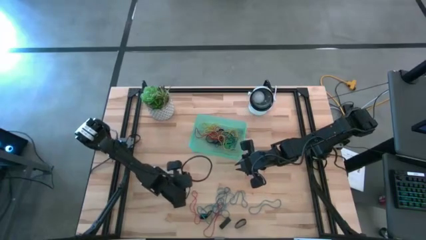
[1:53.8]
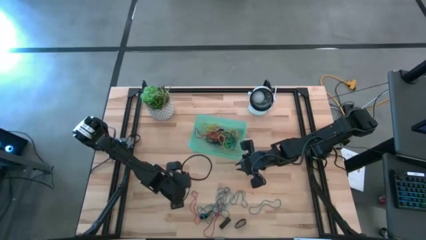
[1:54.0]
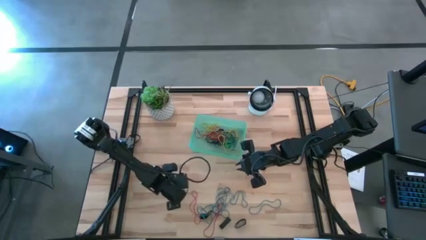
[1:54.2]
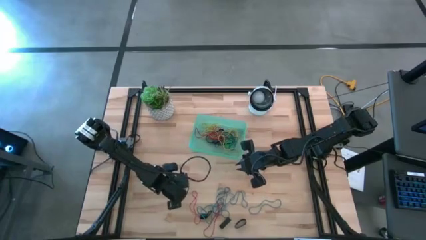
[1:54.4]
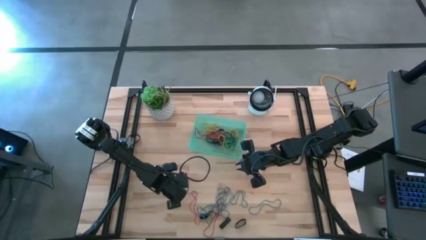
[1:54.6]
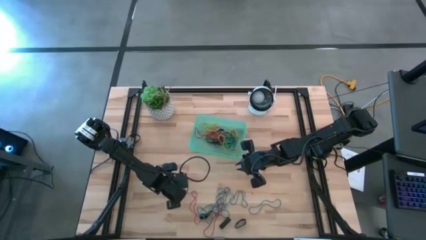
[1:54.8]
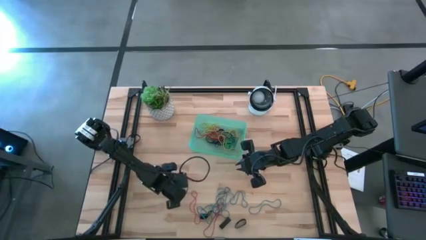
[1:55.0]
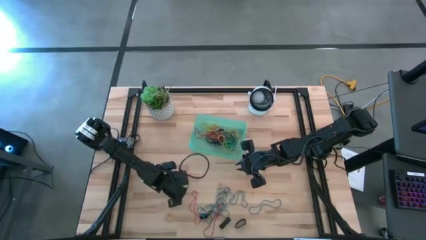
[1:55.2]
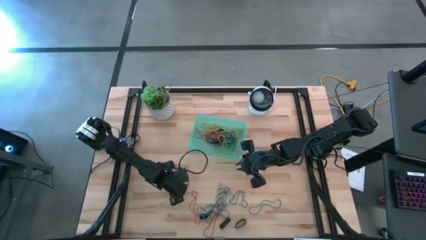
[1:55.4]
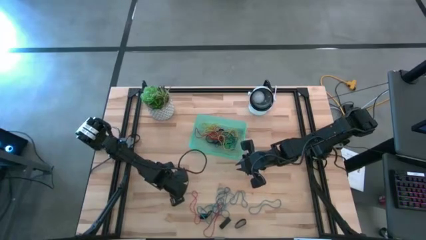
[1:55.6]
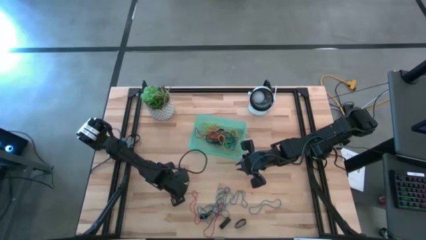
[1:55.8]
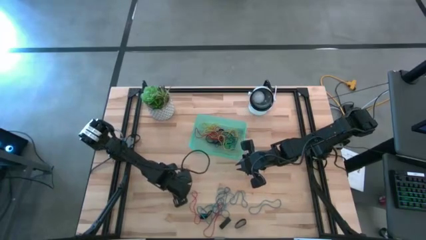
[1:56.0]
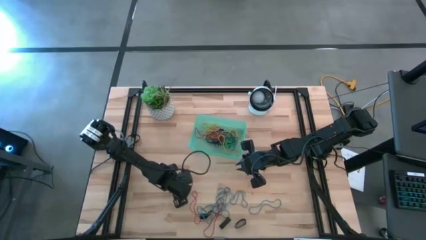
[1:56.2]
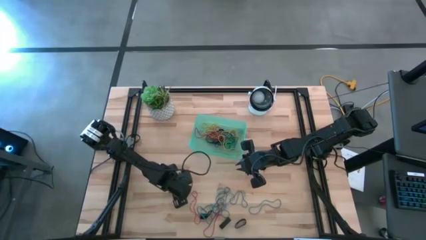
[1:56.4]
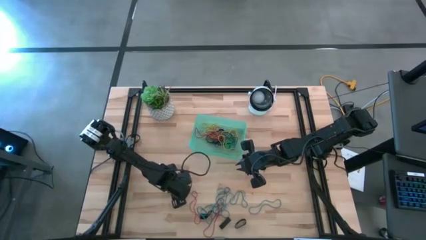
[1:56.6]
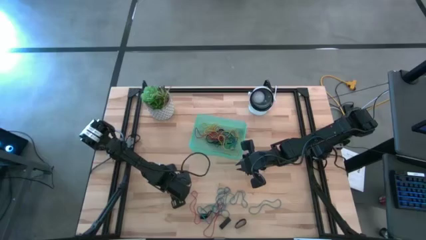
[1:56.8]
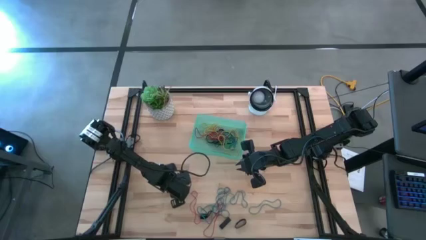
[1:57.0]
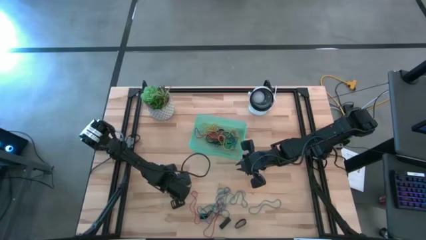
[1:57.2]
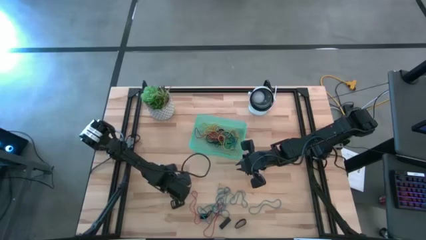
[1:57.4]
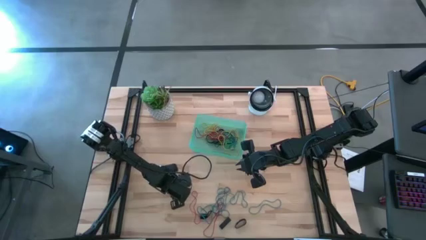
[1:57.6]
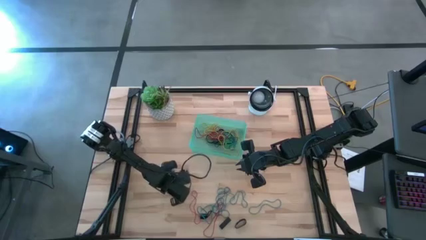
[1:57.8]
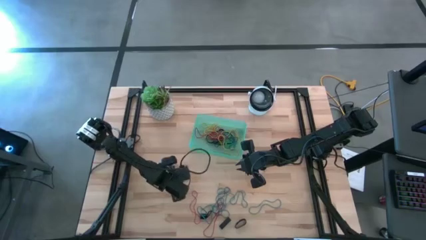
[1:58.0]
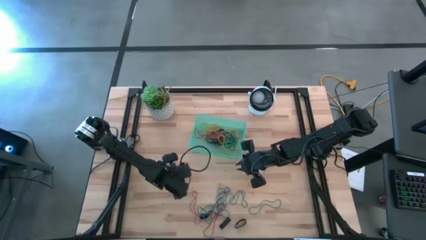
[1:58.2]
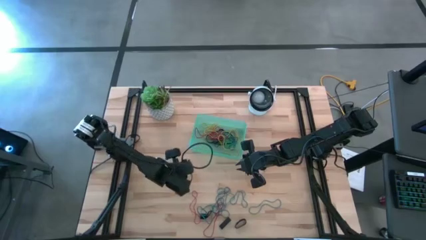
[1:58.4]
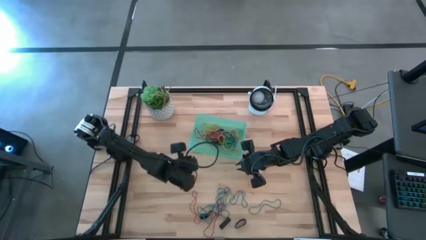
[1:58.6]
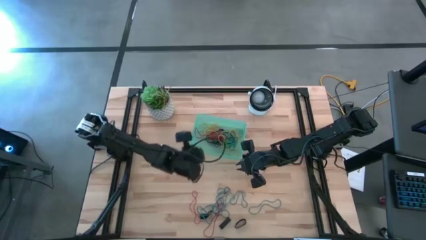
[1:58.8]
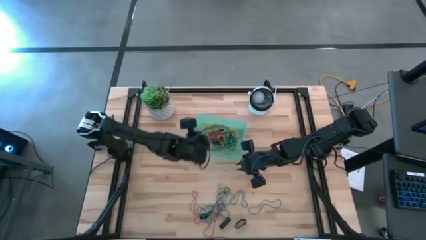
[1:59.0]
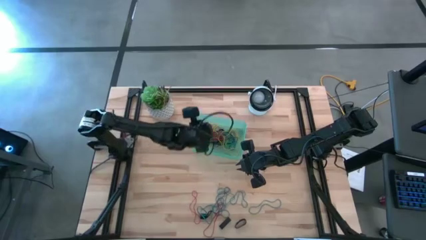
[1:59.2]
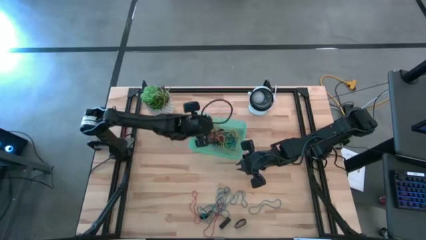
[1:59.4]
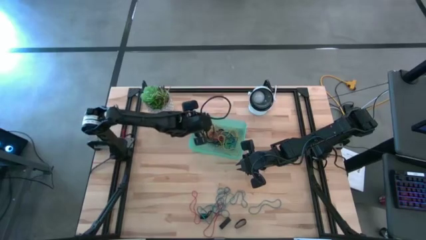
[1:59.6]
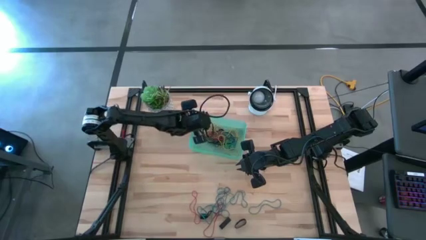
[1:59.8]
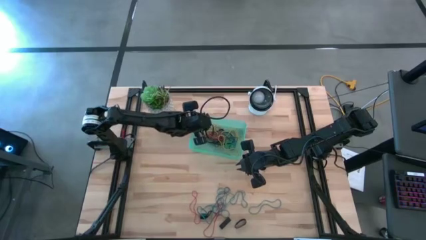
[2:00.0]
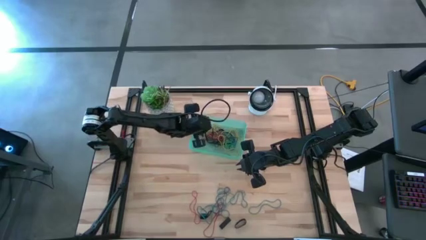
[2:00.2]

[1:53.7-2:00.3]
Task: Pick and place rubber bands into bin
Put the yellow rubber band into the green bin

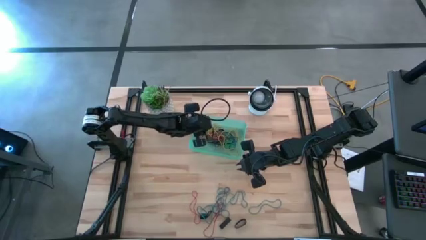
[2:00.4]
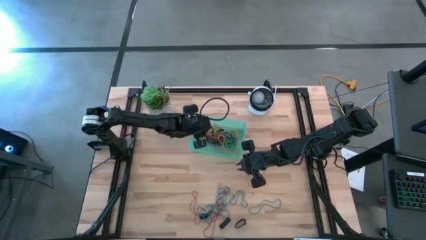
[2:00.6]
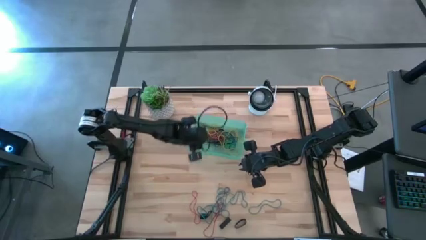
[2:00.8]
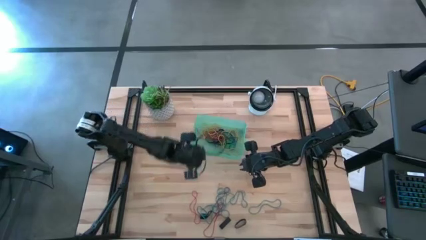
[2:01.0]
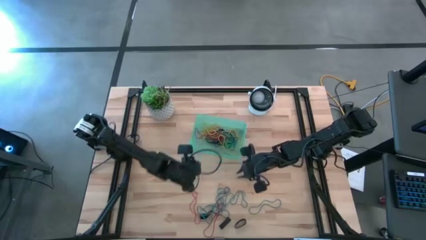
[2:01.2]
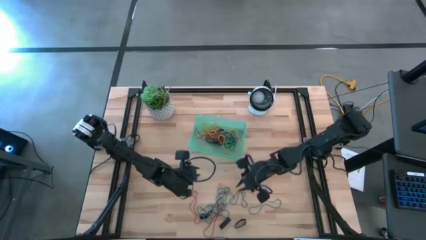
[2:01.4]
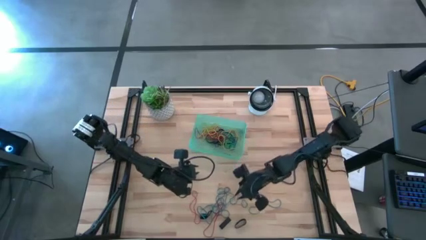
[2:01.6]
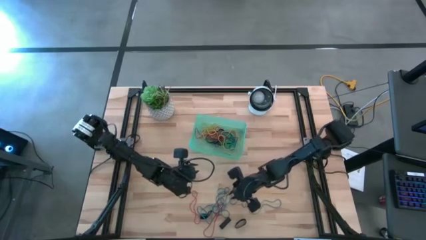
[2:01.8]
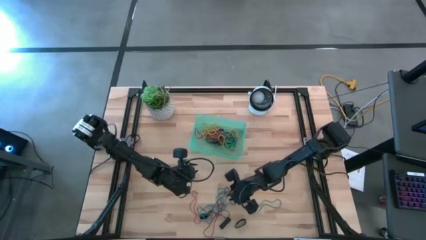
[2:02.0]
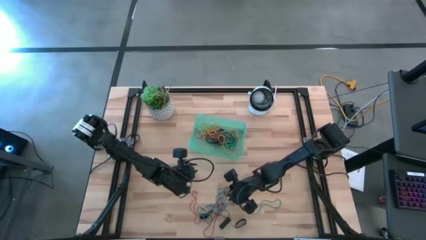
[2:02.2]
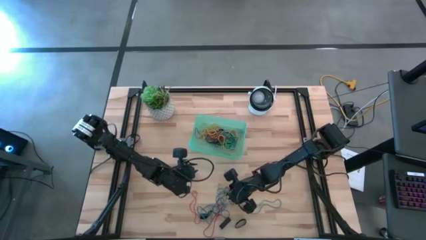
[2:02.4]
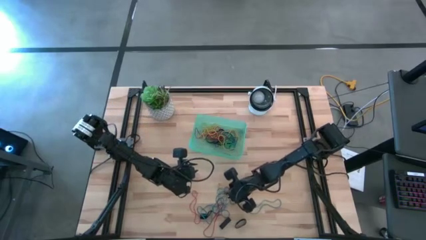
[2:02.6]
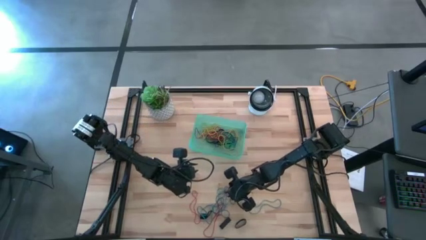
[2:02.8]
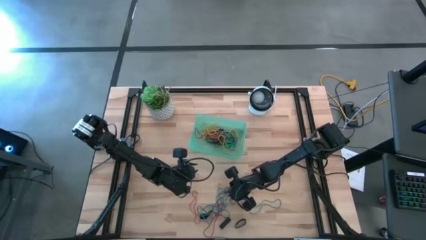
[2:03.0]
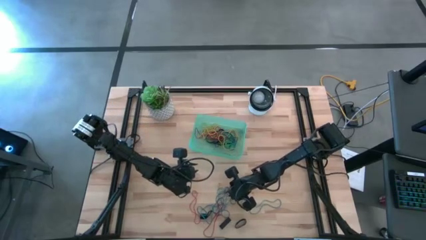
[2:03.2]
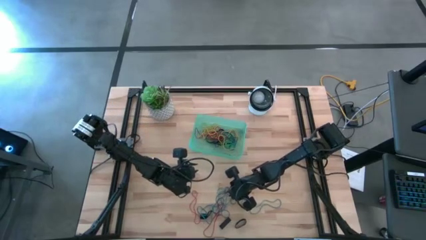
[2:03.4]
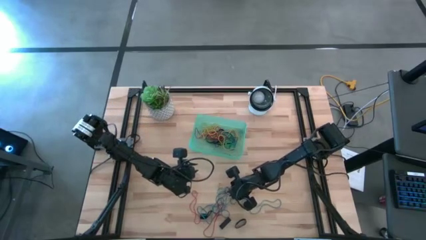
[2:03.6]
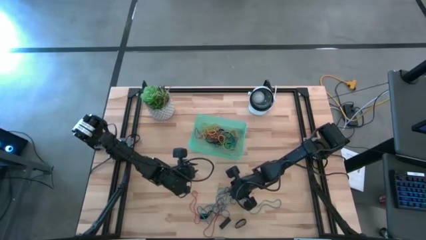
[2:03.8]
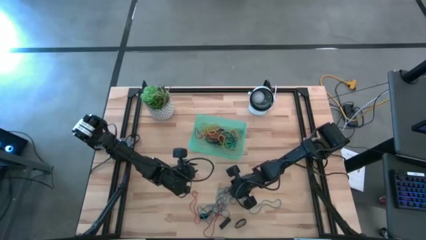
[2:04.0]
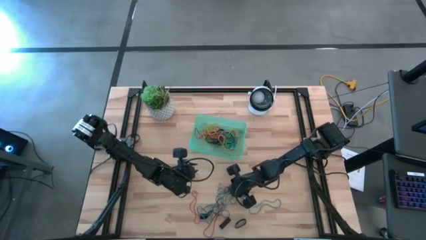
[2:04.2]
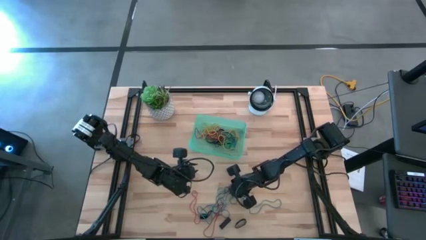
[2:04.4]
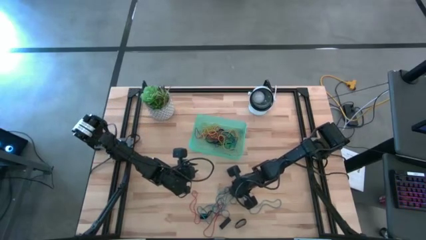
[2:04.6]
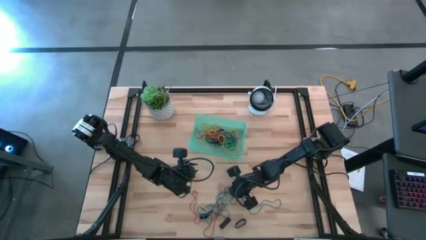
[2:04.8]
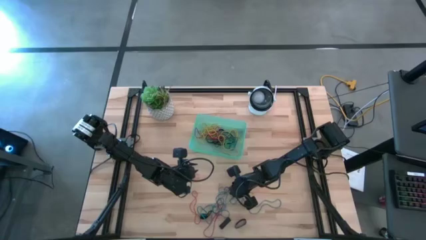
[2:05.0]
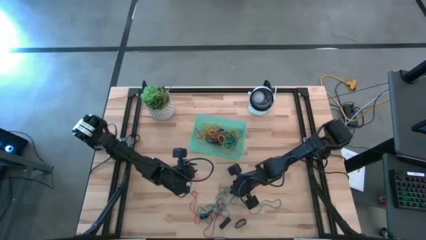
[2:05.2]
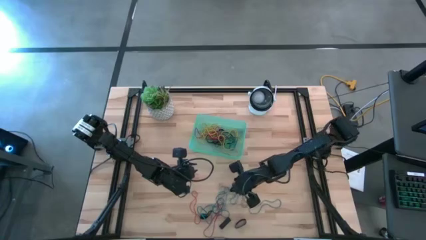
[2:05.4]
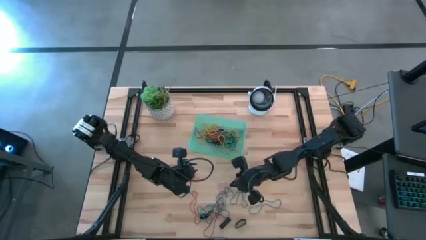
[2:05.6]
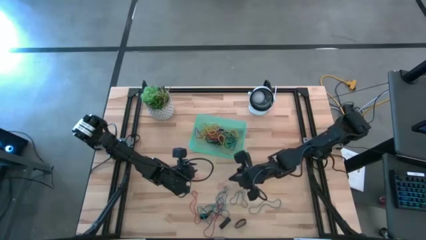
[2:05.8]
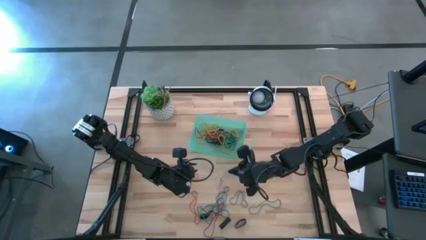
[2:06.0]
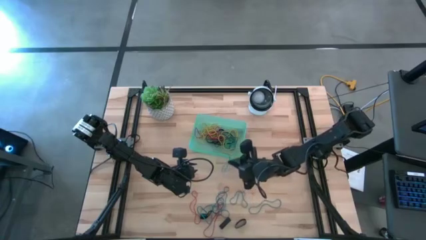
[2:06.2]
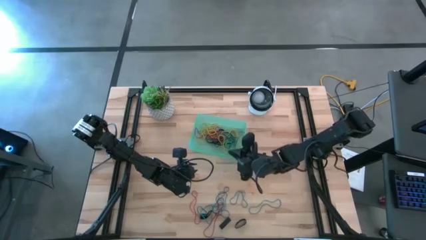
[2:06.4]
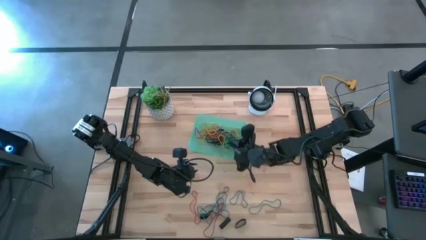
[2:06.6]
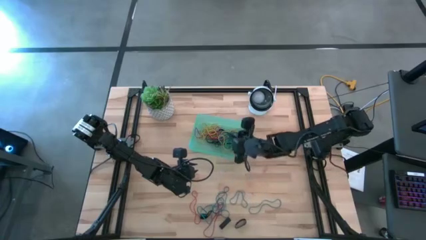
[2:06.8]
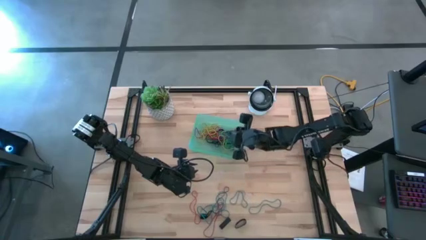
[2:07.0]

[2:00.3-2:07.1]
Put the blue rubber band into the green bin

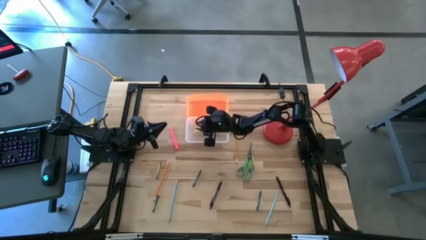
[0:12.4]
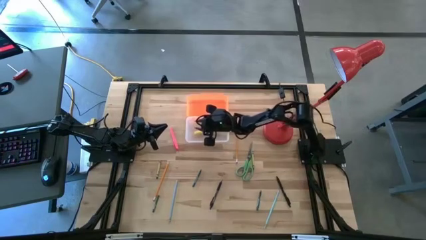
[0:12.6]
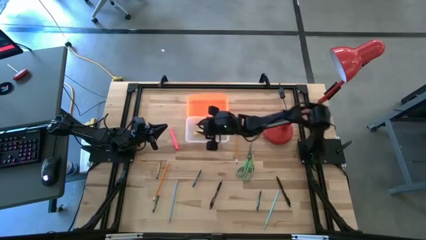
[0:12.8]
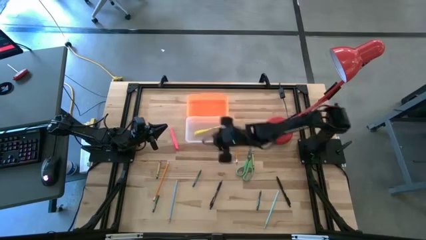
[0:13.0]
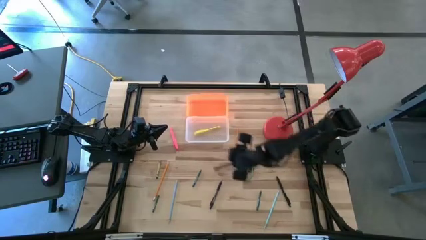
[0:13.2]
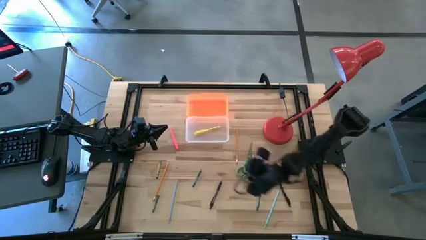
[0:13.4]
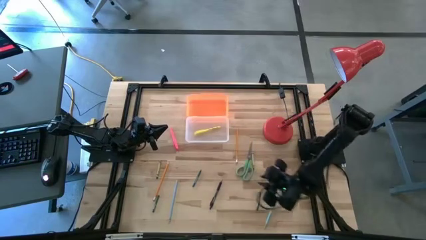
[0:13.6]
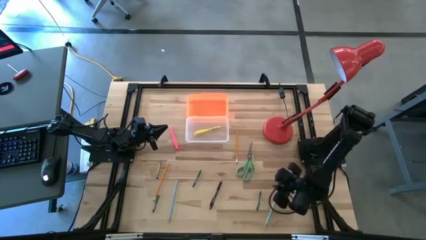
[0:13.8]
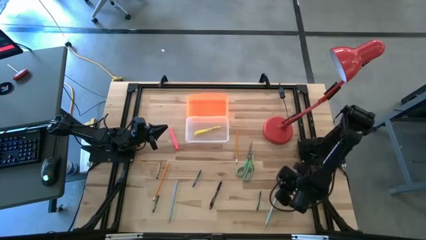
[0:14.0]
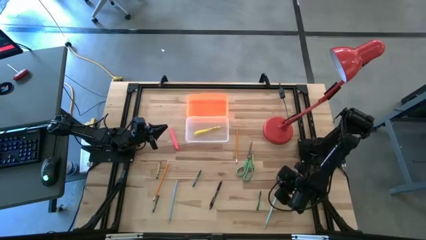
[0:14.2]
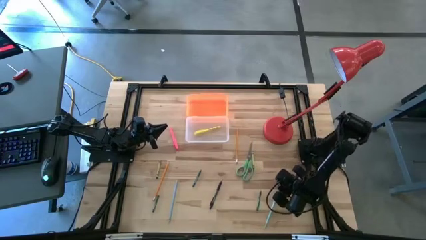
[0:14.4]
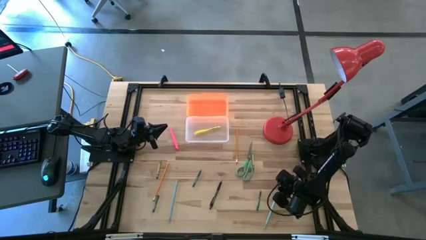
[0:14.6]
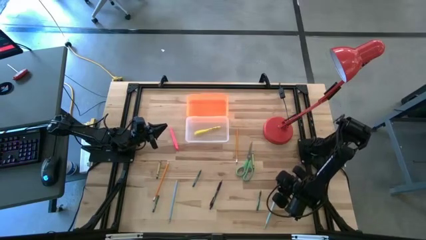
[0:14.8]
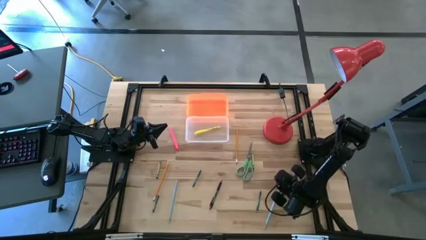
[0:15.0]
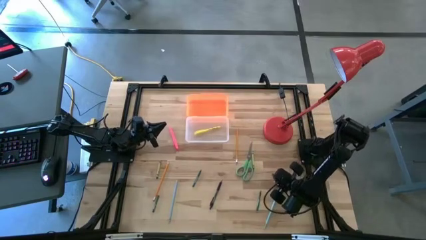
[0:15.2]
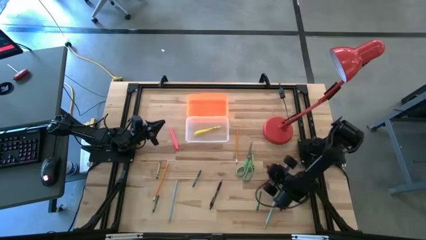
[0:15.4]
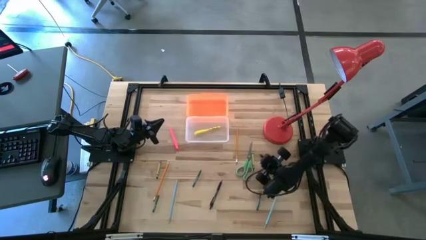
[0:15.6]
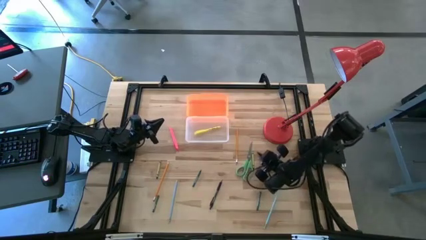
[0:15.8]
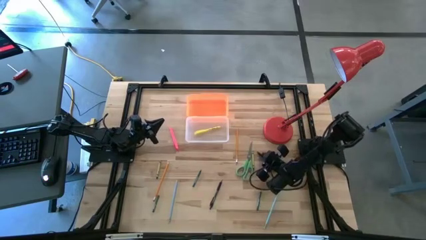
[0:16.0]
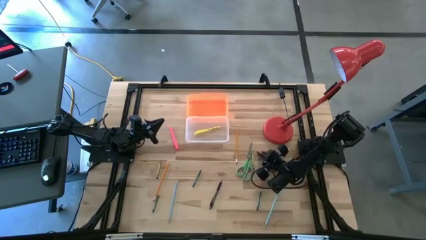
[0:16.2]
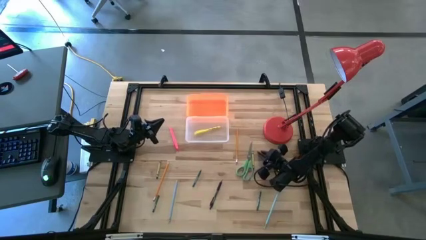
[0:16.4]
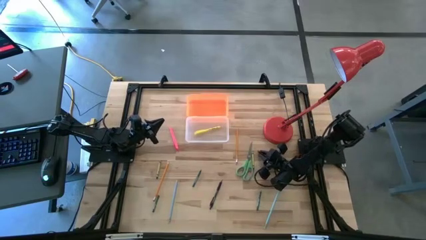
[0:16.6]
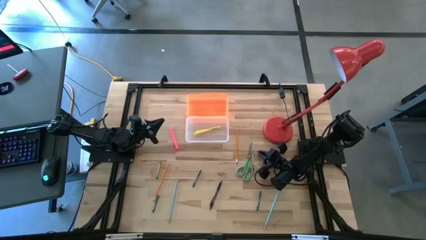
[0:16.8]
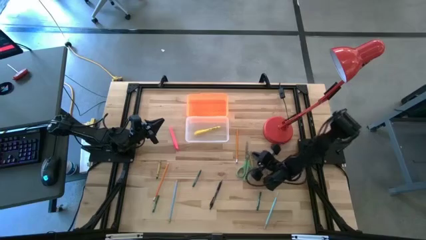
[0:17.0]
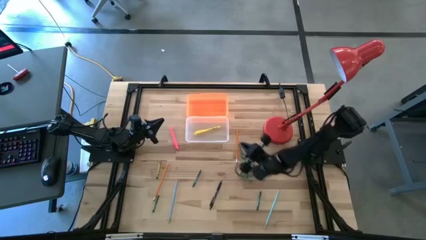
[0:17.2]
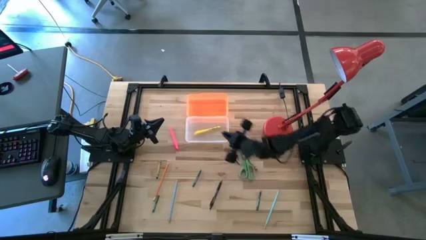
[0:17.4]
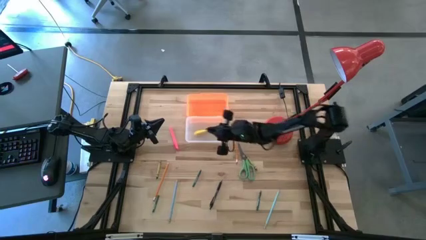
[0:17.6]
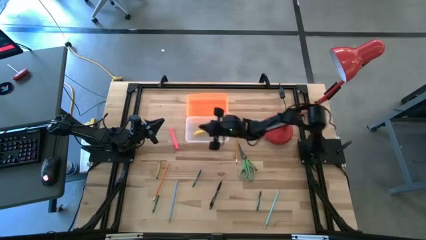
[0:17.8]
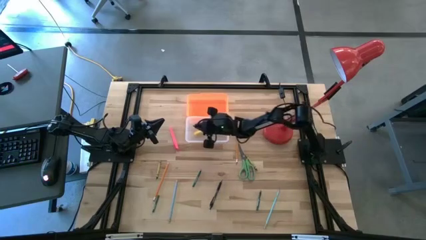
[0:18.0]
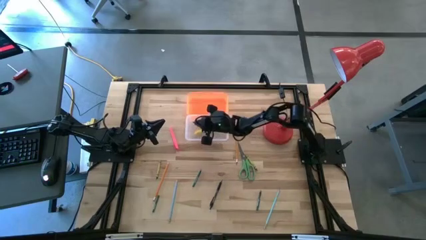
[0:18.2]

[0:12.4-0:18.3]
Task: Pick & place school supplies into a supply box
Put the right black pen into the orange supply box
